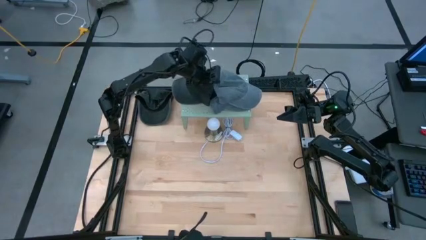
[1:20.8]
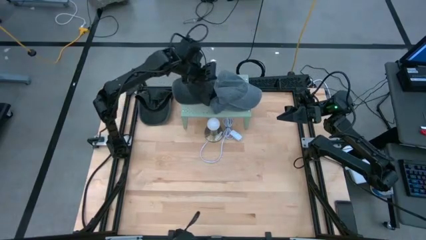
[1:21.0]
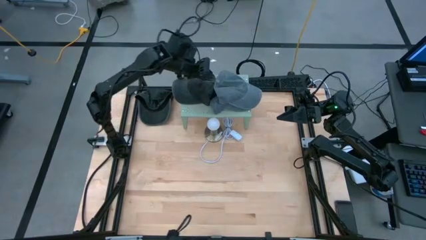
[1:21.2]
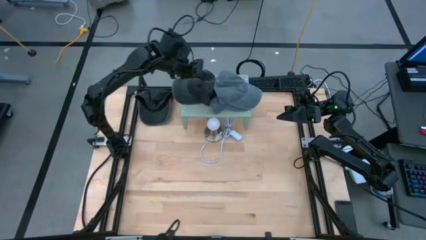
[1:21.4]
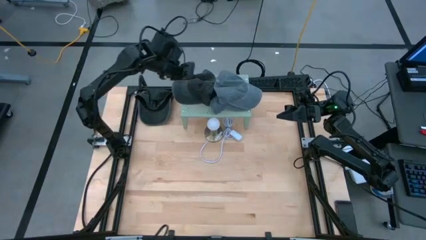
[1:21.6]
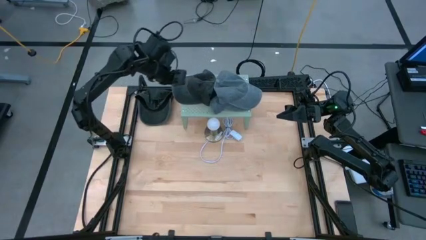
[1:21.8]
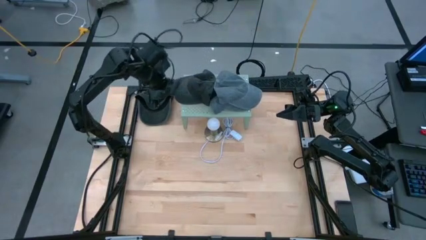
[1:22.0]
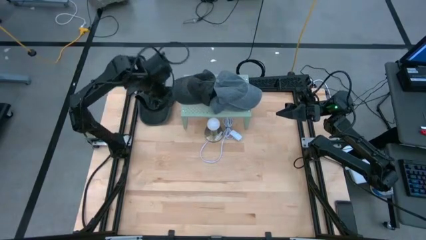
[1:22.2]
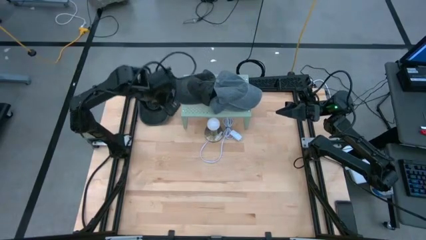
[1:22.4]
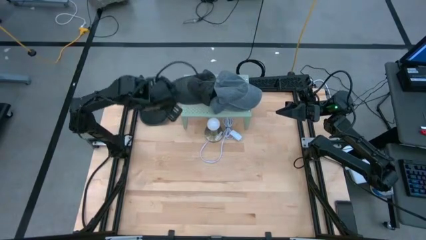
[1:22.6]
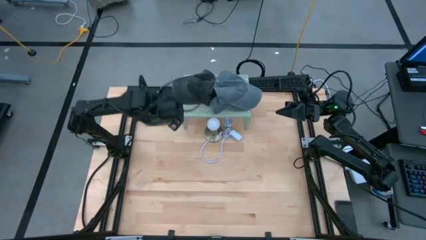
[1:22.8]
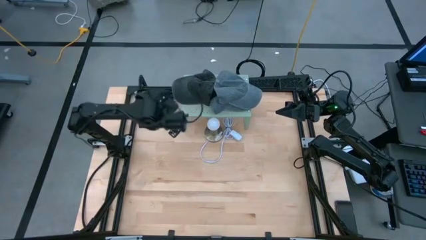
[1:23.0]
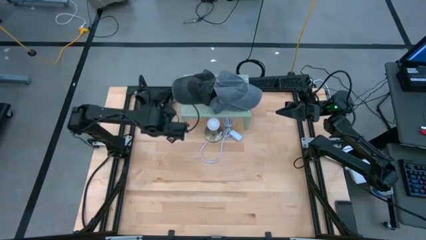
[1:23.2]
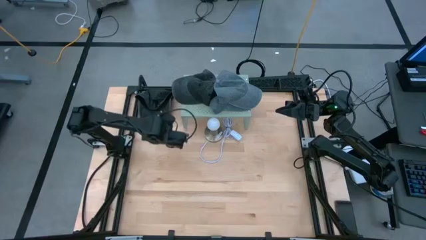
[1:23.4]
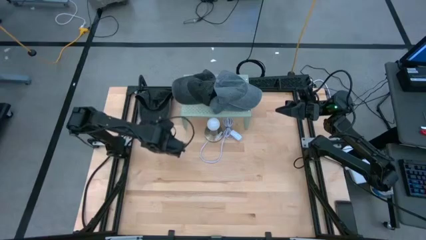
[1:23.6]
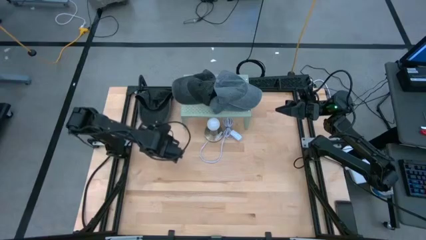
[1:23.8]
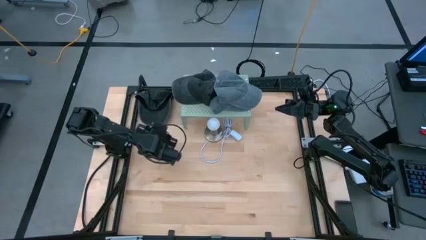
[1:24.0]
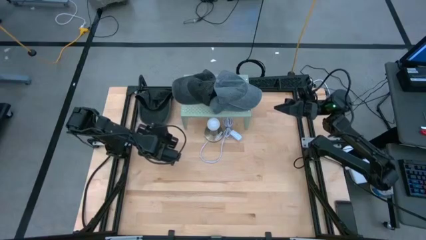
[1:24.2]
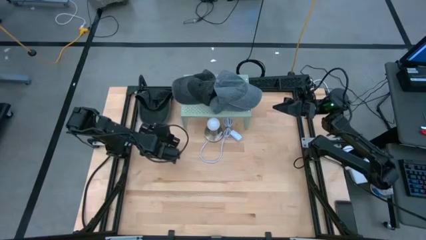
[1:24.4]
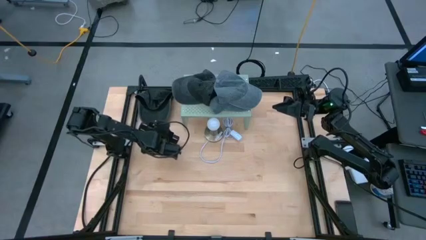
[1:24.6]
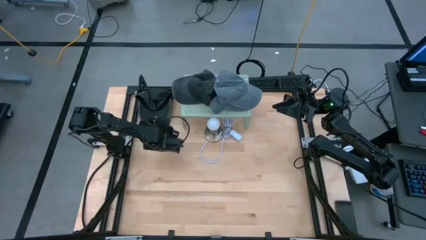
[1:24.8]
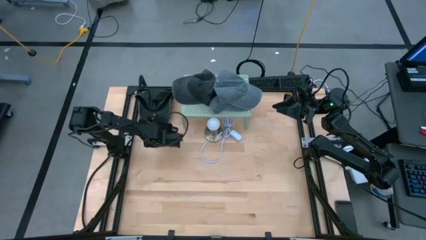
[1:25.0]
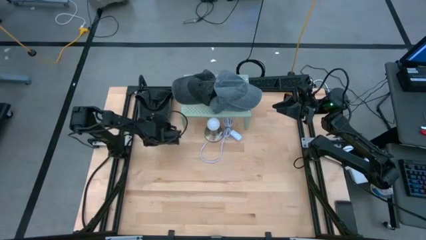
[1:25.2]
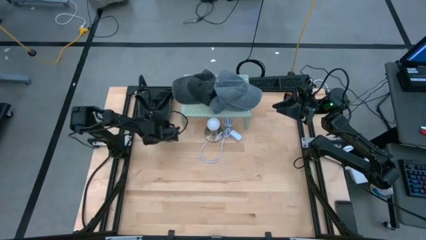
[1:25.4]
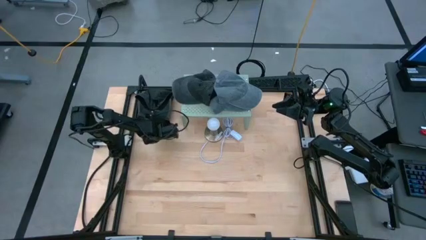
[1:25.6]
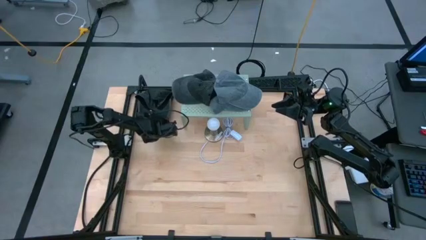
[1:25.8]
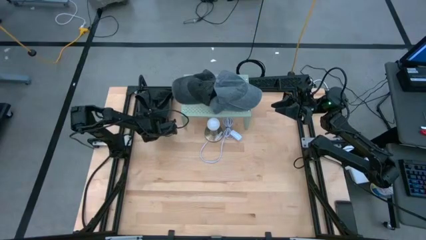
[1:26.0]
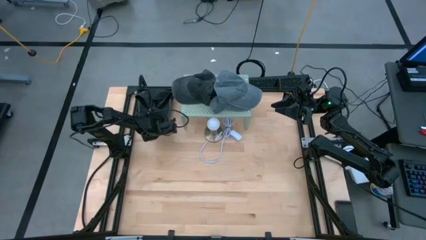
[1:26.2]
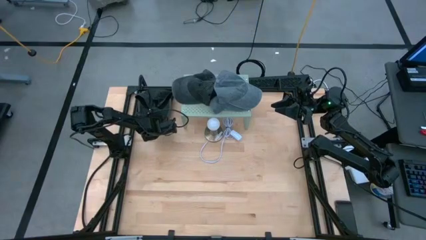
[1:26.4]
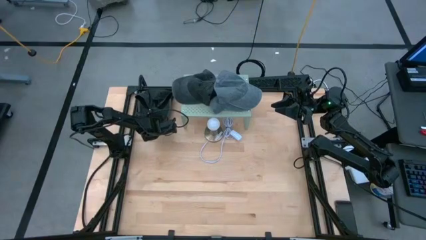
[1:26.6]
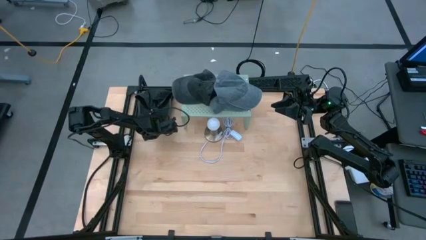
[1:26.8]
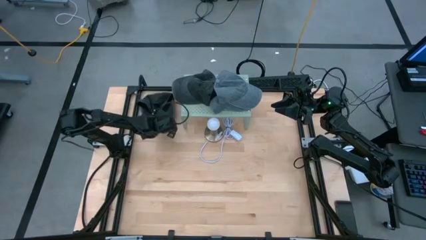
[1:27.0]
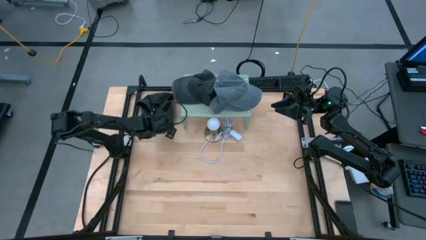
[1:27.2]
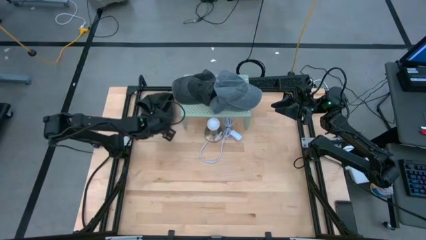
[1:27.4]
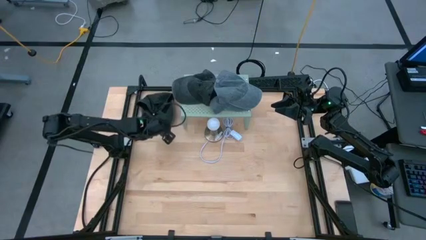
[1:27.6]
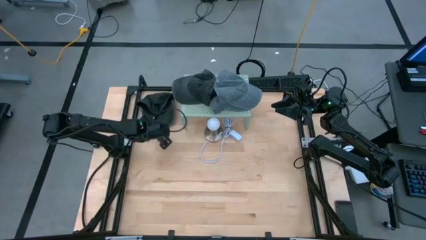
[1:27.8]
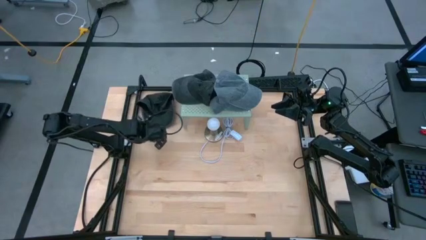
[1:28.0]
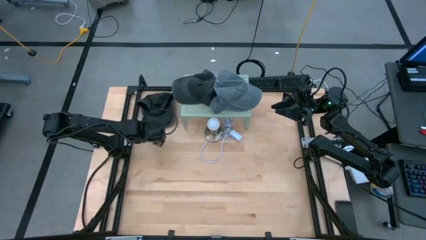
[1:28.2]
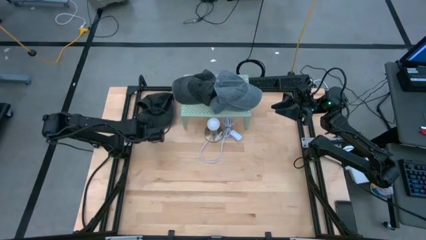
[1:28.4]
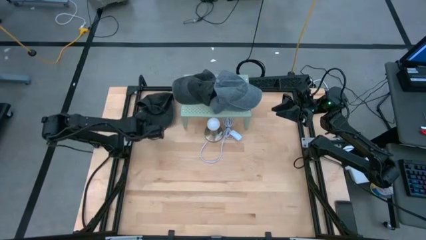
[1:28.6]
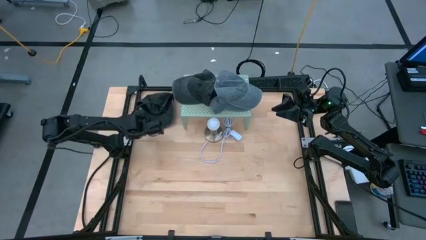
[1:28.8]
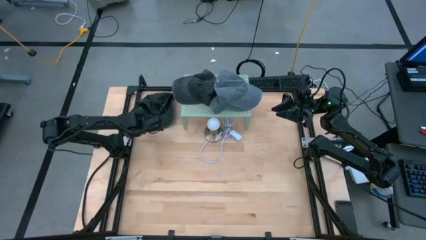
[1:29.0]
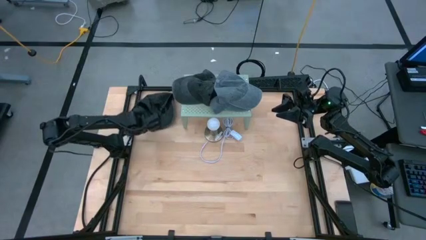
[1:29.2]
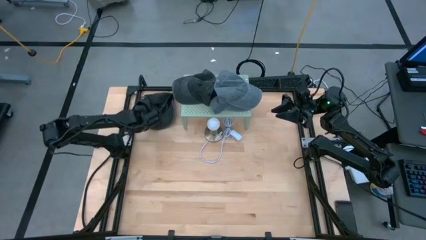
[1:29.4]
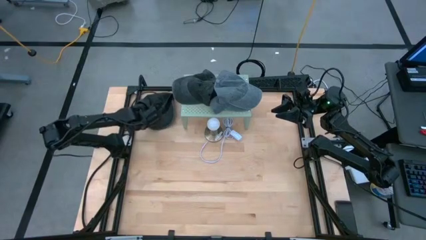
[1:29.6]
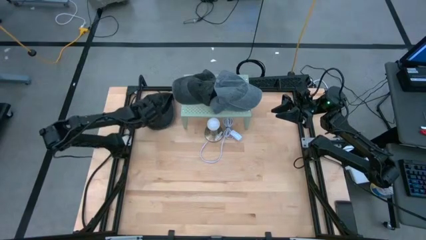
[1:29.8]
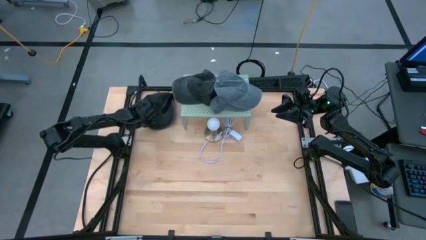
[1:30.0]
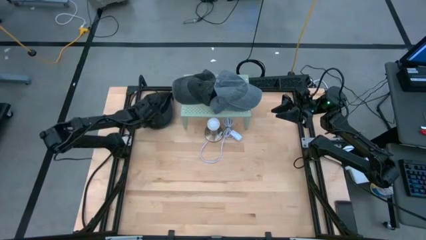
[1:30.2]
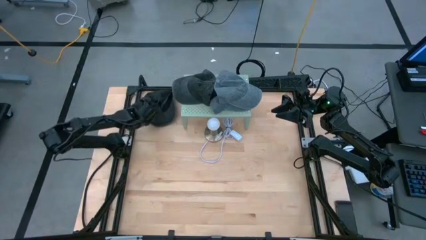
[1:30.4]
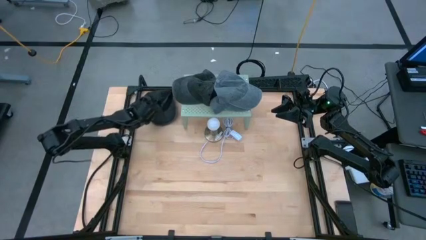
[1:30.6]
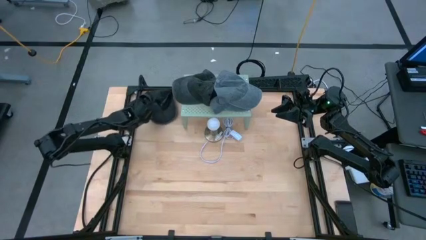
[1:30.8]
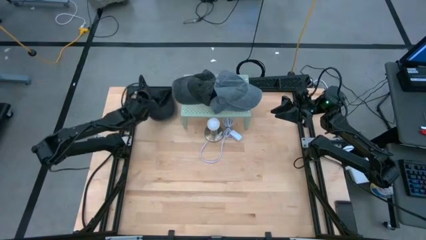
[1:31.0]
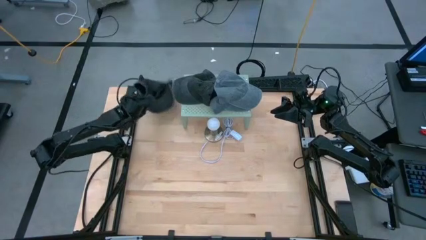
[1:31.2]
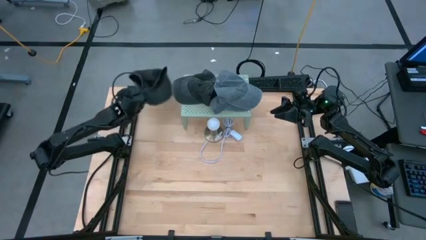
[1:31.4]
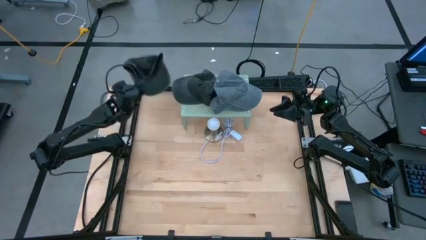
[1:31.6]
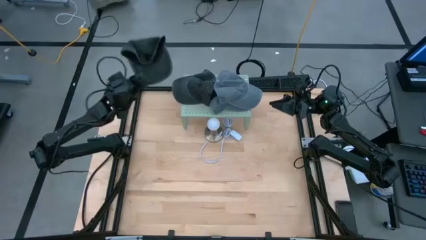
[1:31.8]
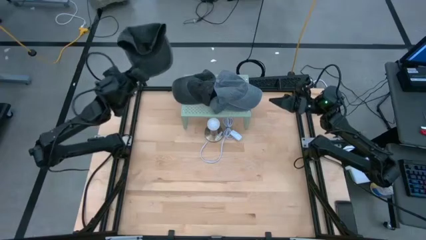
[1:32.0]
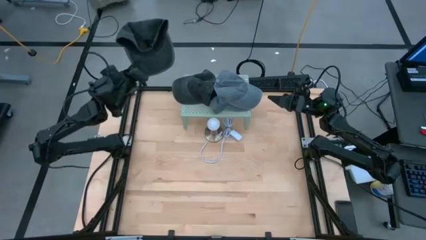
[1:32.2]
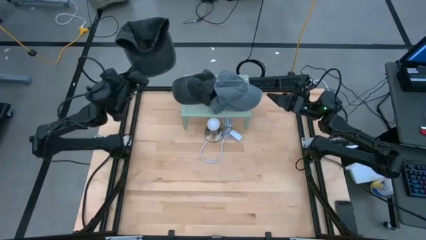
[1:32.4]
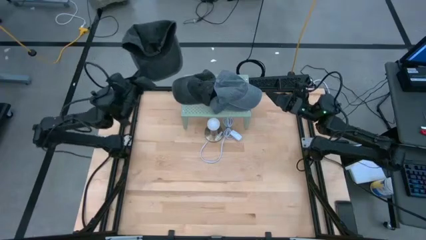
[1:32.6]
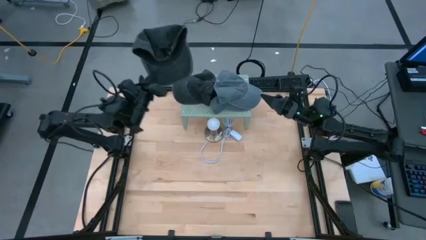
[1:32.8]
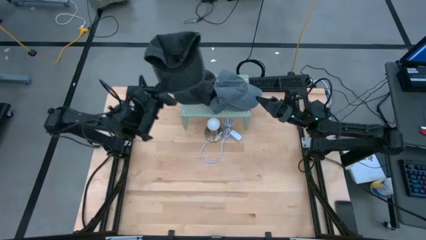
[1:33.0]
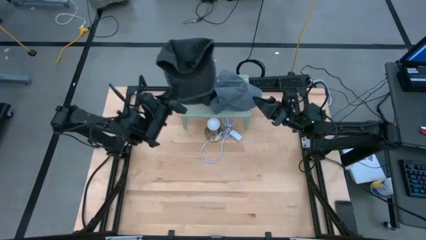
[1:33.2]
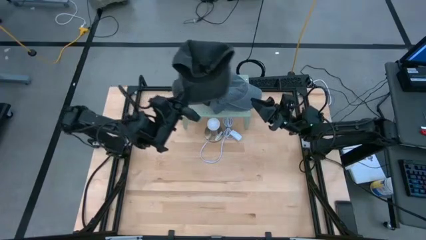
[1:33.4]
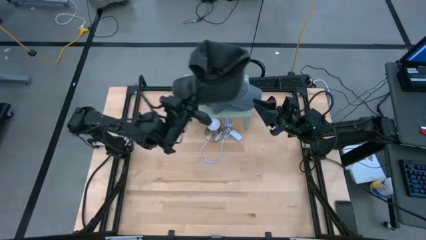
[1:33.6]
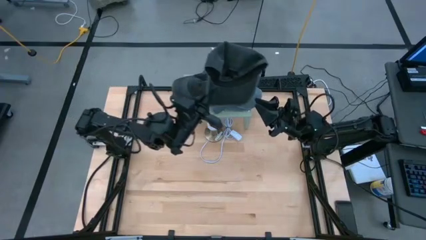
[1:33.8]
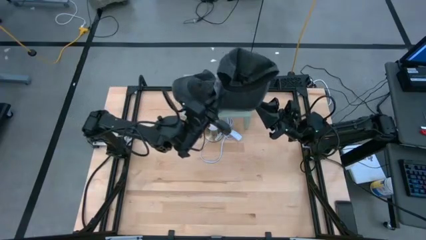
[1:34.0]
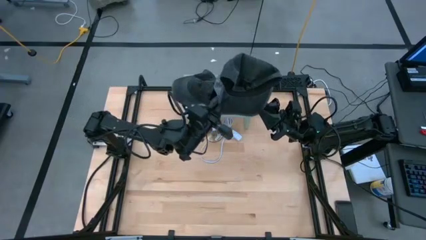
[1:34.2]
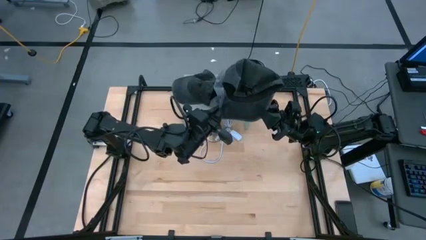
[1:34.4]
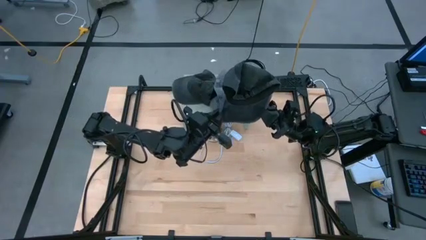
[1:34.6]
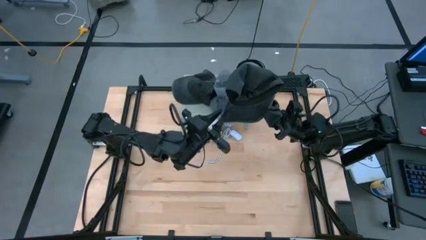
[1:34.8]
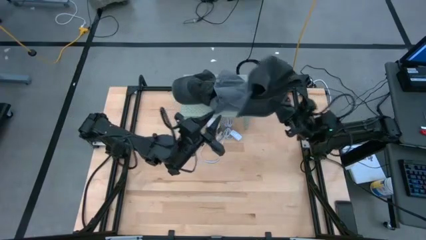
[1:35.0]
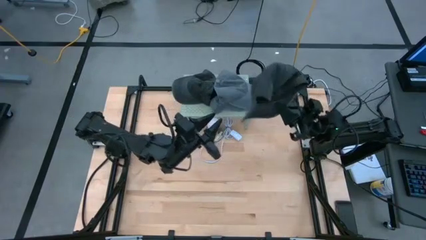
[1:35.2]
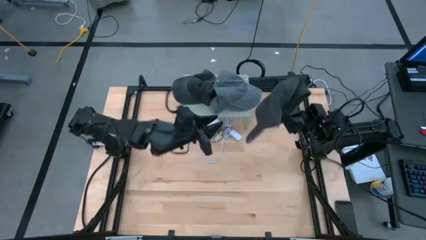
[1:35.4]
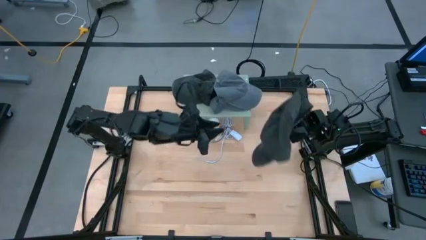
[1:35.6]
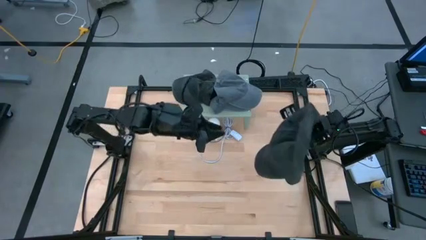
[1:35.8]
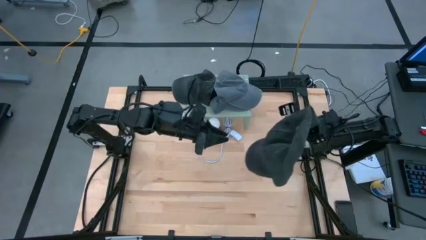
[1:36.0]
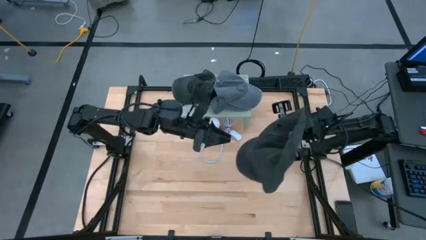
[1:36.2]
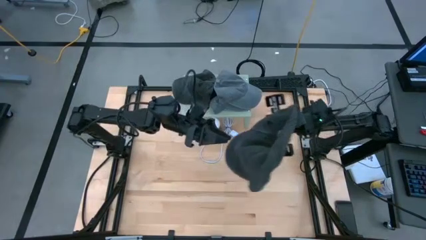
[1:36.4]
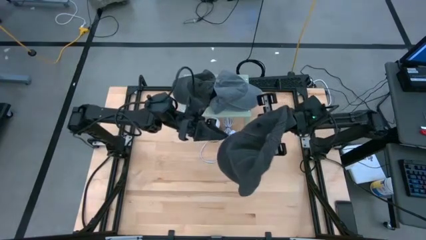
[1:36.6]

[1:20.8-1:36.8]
Task: Pick & Place hat
Stack the black cap on the other black cap on the shelf
